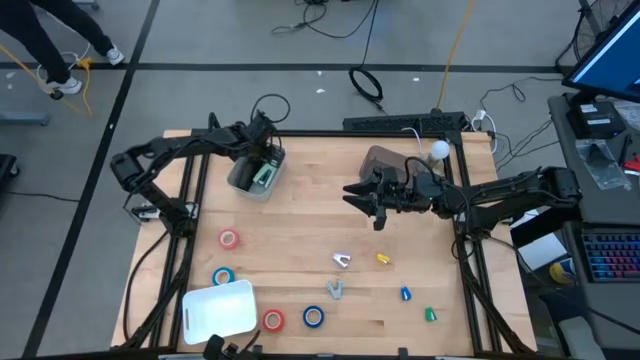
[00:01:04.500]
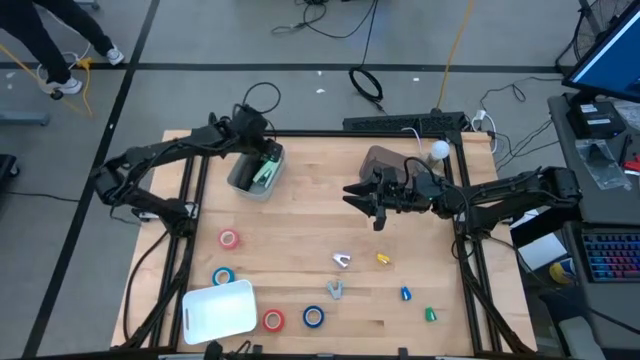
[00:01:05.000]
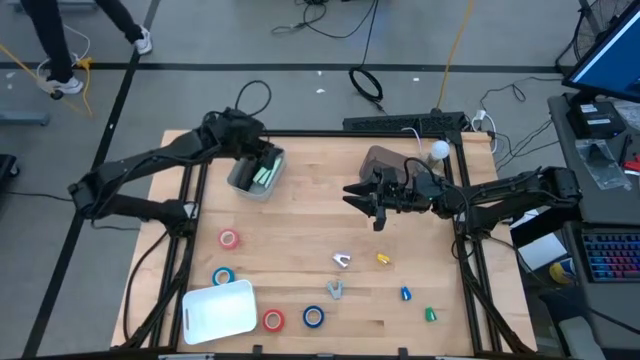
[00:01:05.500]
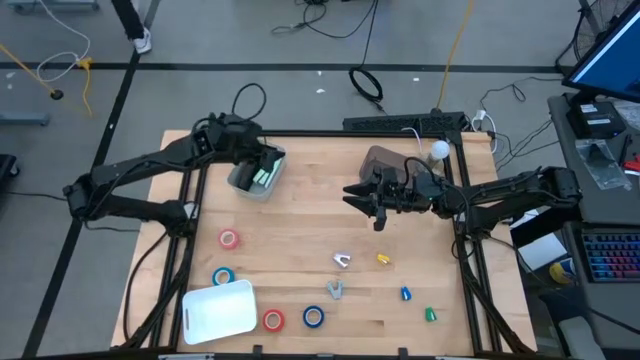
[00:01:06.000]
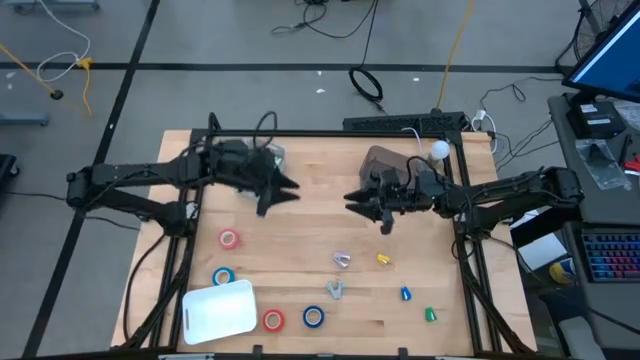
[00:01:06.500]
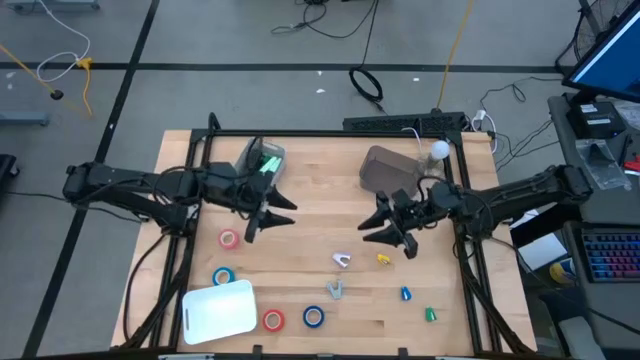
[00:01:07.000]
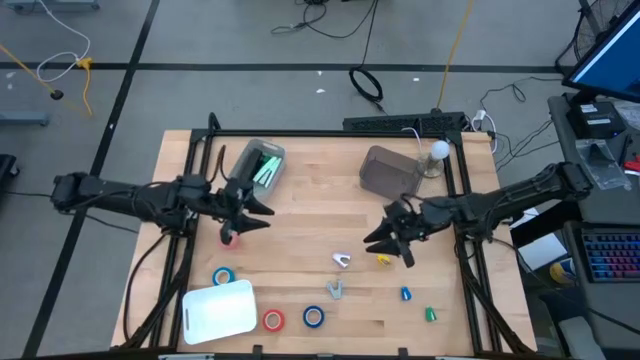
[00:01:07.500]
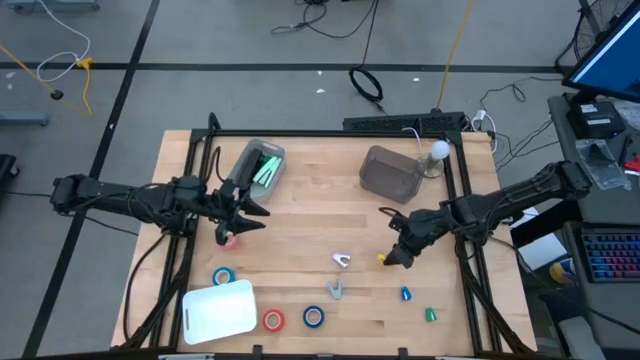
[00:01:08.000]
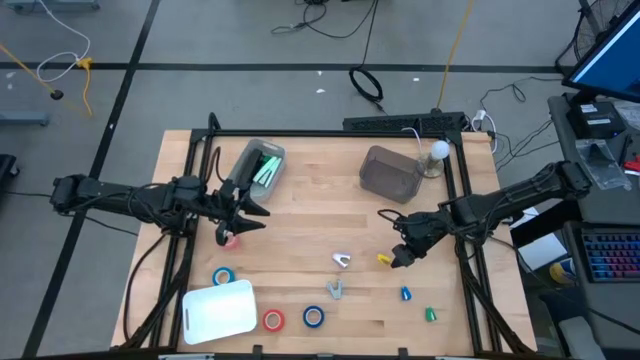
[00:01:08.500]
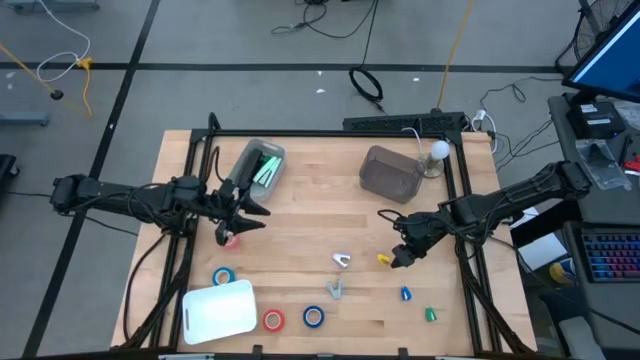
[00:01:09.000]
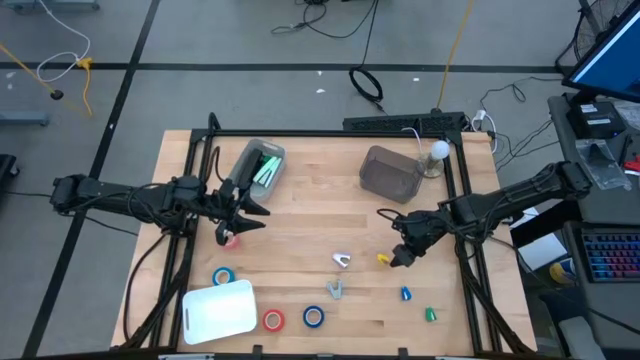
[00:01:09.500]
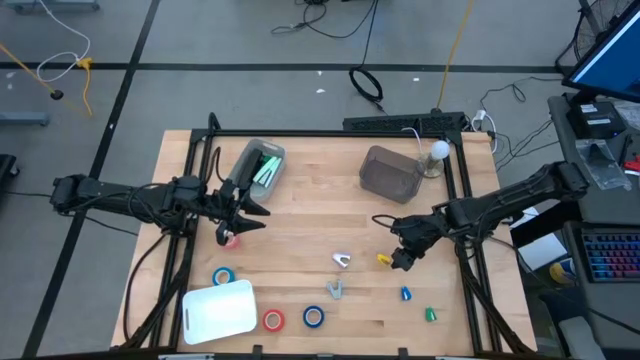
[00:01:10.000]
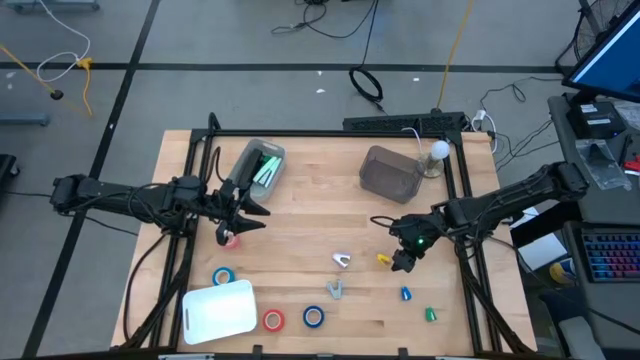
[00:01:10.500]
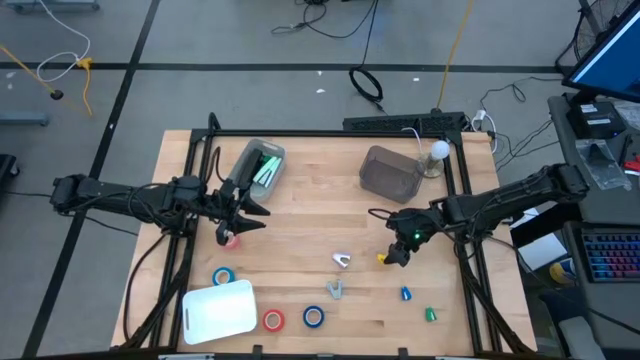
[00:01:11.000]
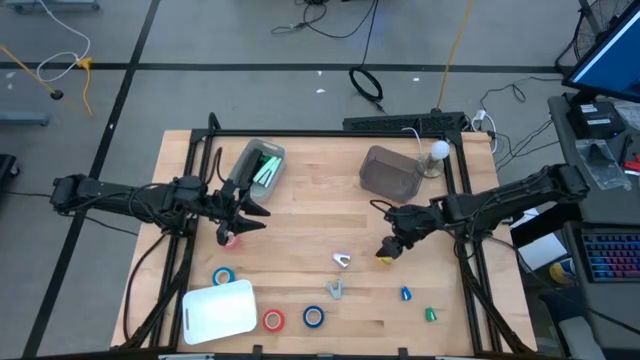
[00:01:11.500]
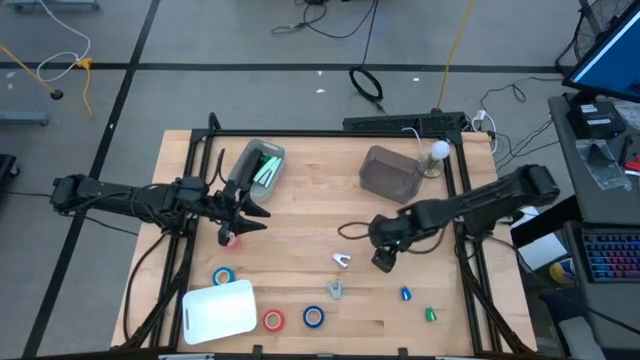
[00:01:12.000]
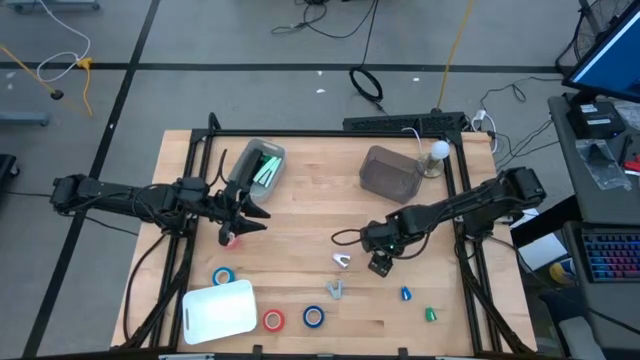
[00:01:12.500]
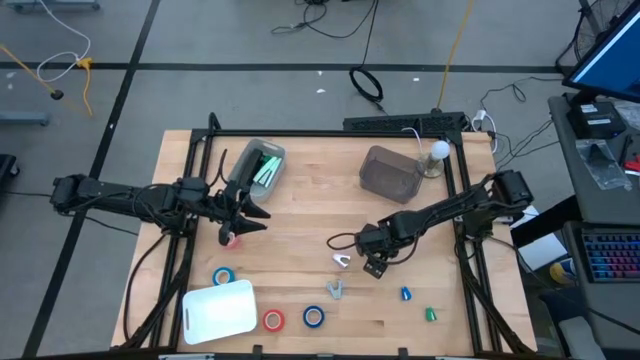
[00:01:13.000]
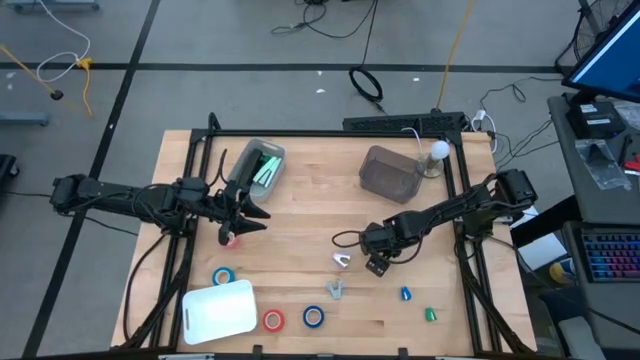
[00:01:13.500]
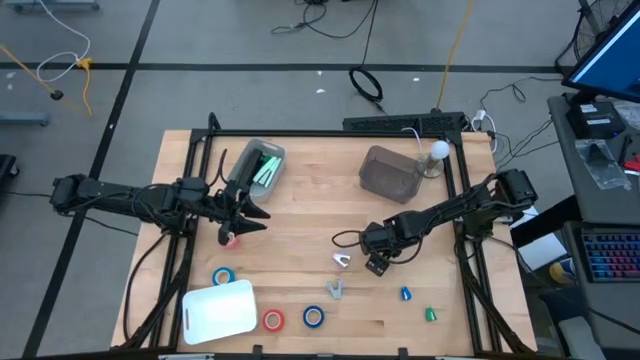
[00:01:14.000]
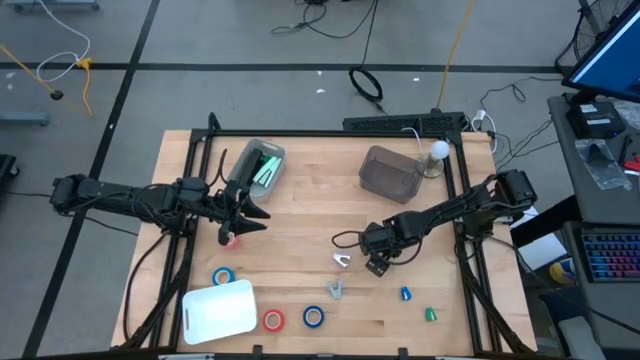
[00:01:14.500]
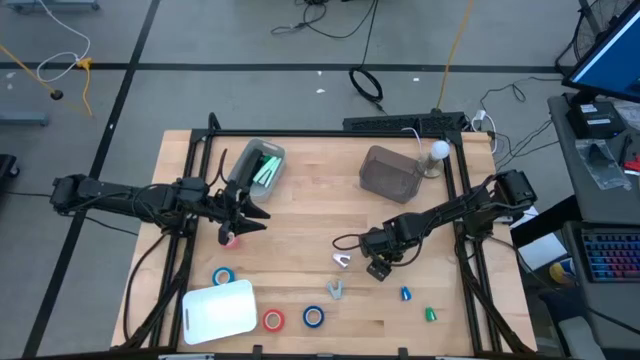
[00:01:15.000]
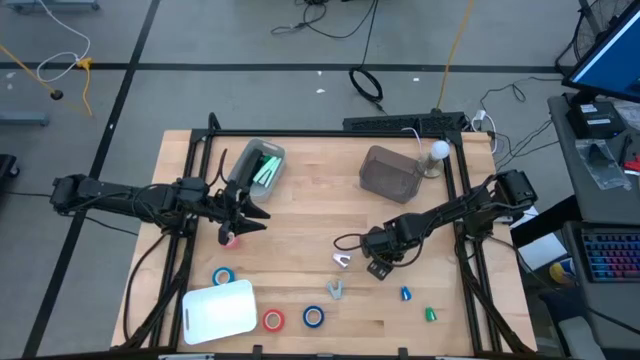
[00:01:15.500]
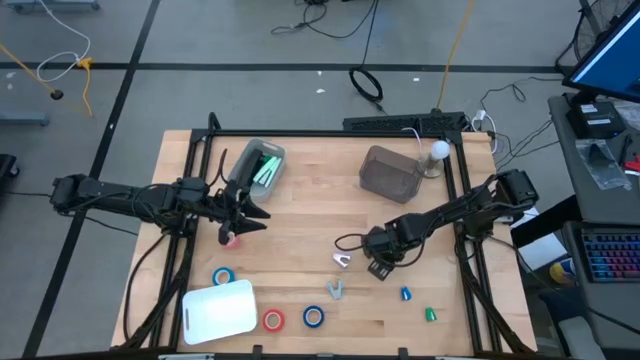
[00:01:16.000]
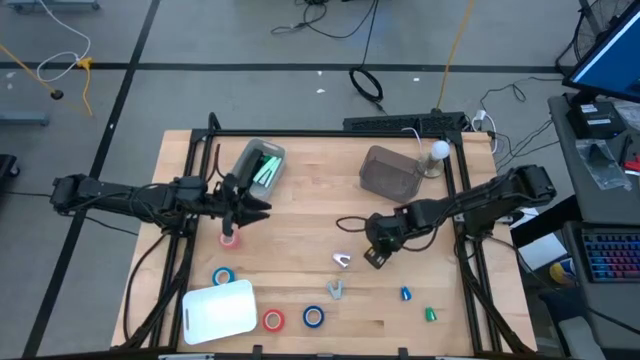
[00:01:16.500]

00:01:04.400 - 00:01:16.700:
Task: Pick and place Stapler, Stapler remover, tape
Put the yellow stapler into the gray bin

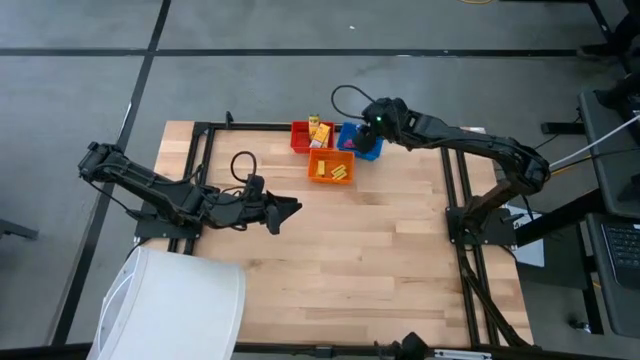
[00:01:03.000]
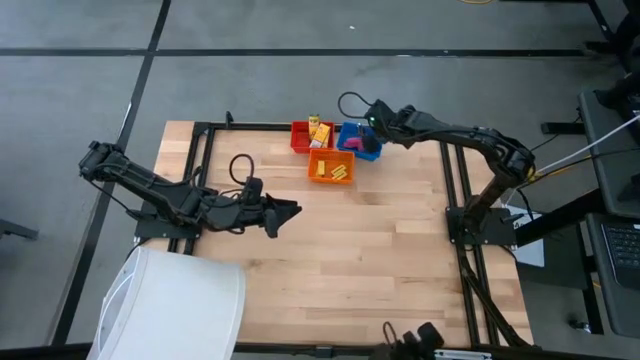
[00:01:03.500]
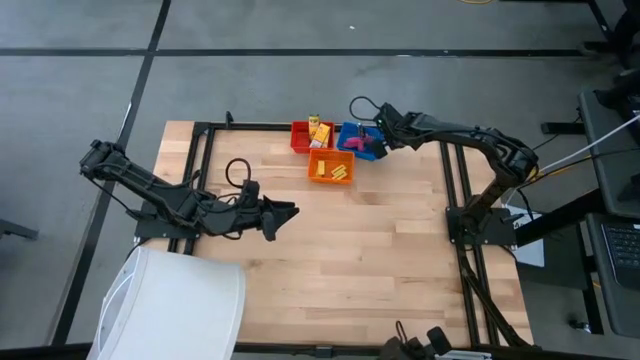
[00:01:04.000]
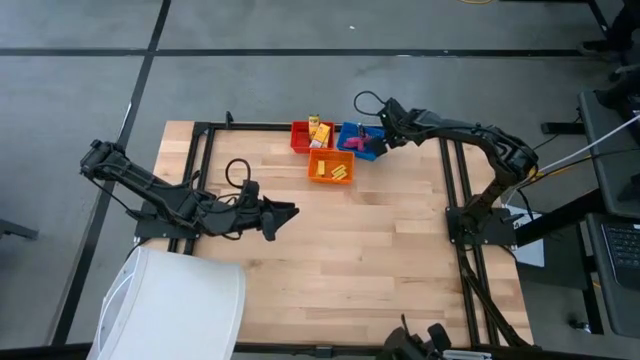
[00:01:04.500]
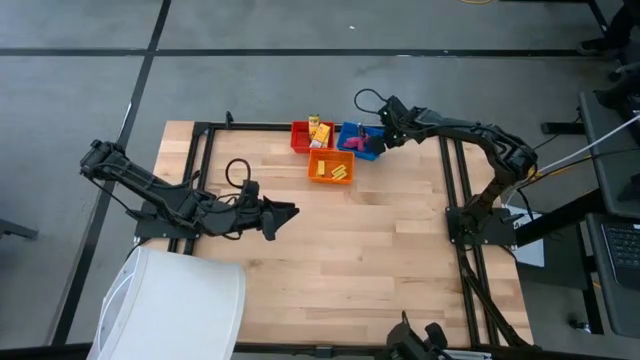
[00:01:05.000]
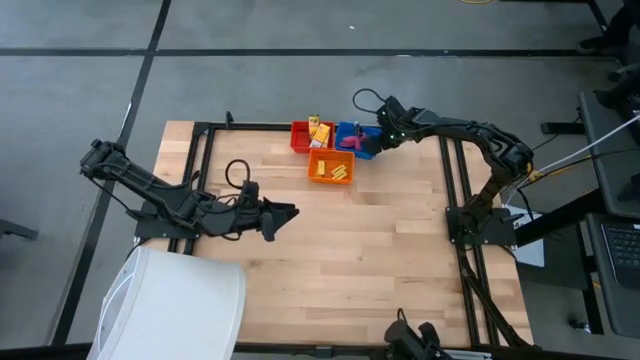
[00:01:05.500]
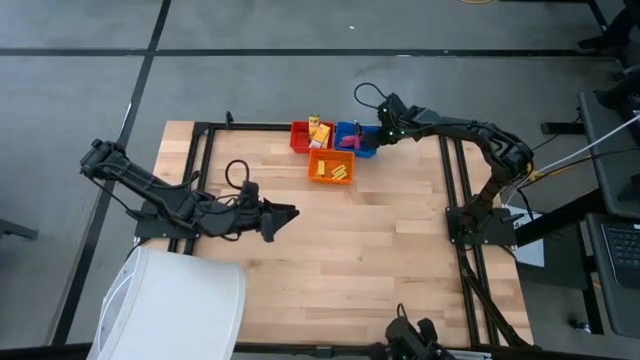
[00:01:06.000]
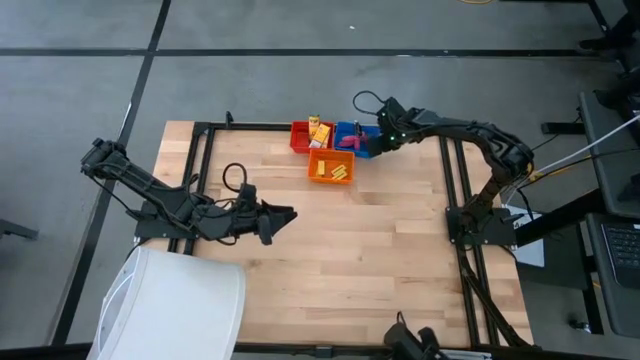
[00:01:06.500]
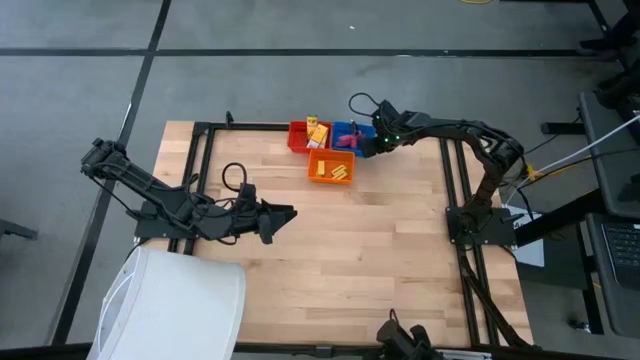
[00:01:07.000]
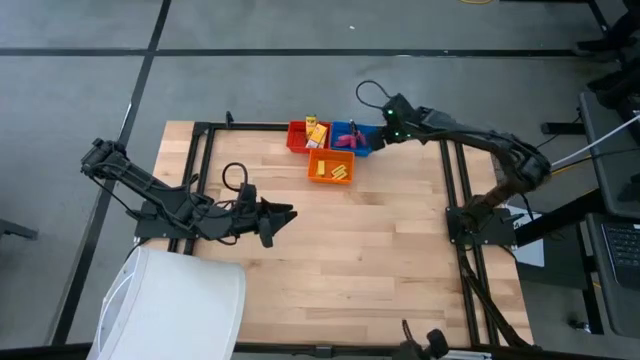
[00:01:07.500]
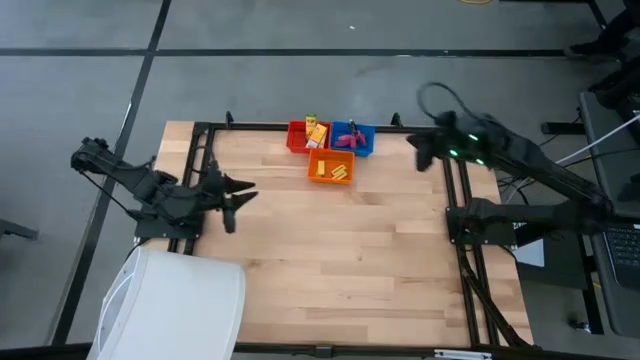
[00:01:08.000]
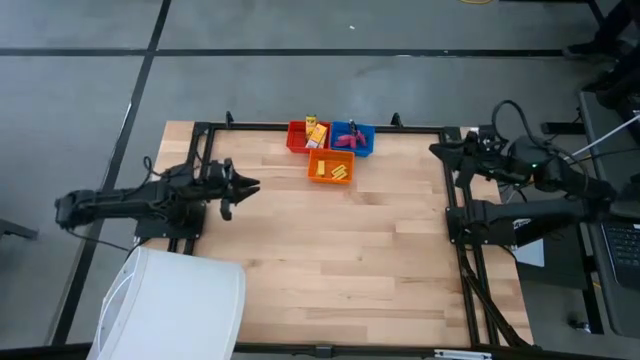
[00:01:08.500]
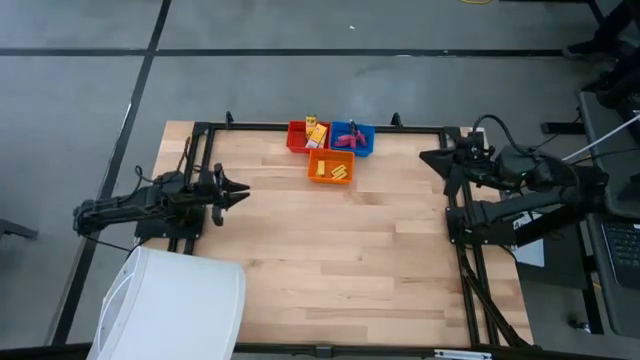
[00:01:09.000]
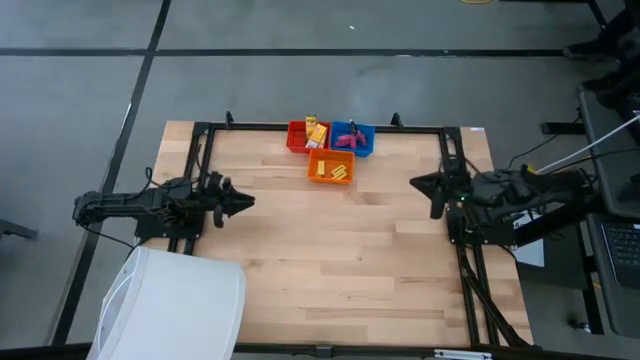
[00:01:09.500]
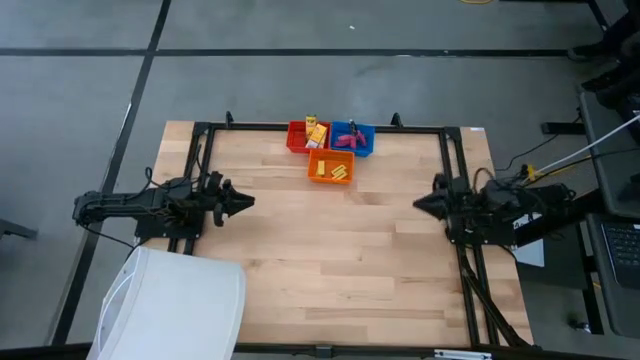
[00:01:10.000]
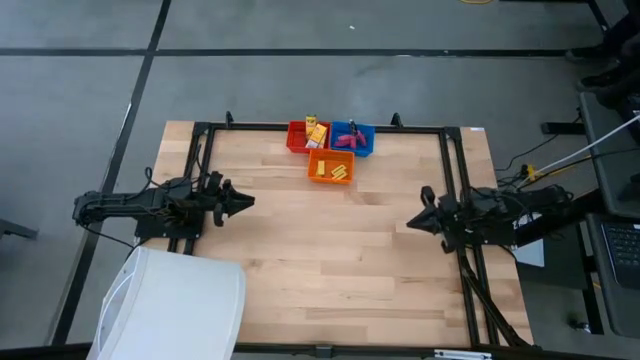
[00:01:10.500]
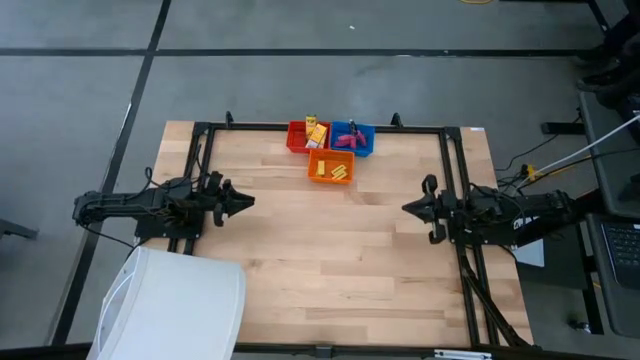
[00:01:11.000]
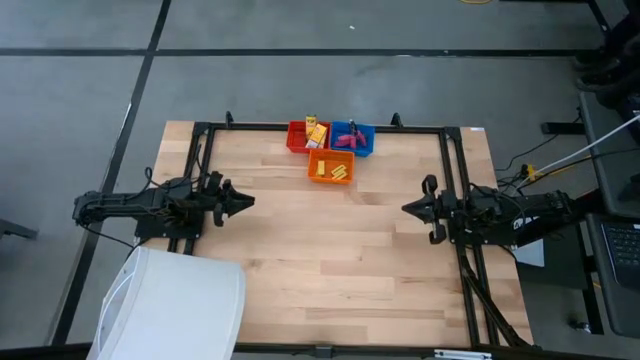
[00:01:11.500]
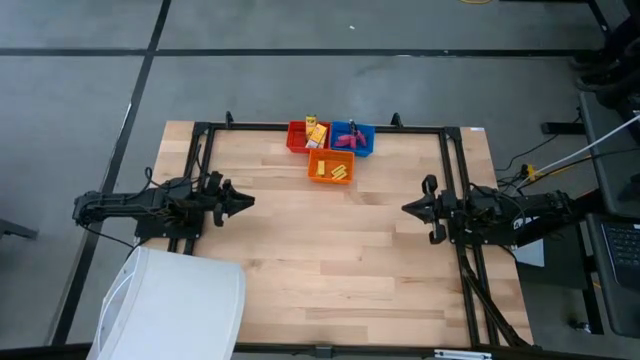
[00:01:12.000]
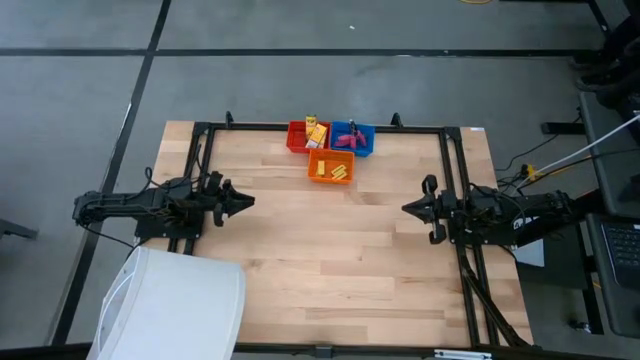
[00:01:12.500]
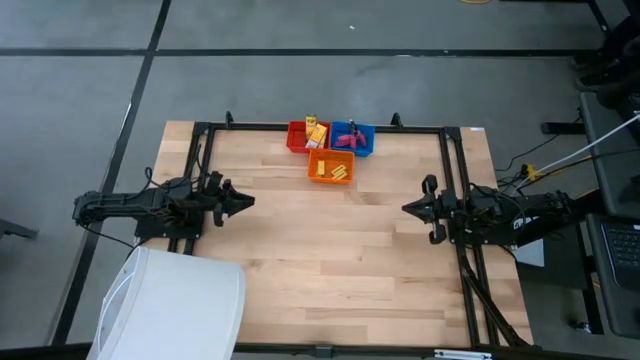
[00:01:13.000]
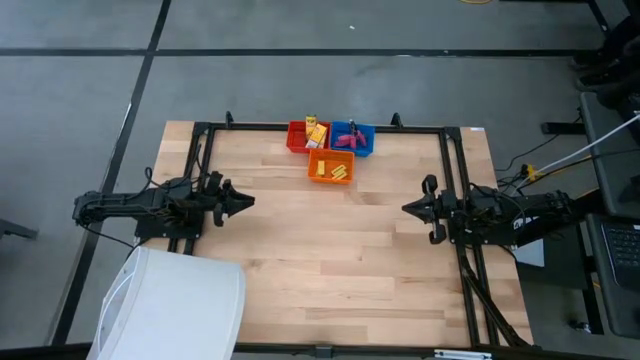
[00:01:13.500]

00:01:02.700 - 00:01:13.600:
Task: Pick & Place School Supplies
Return to Home Position
